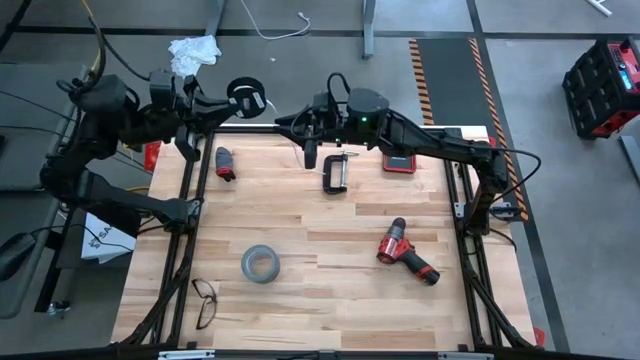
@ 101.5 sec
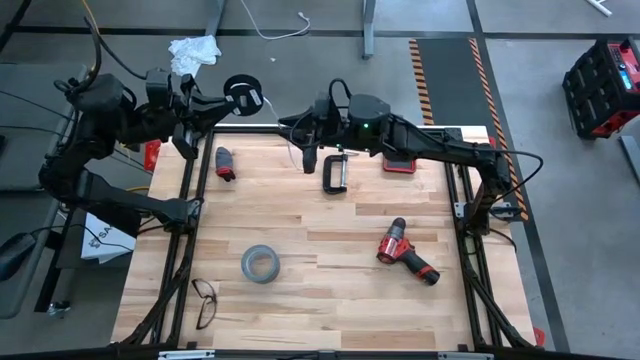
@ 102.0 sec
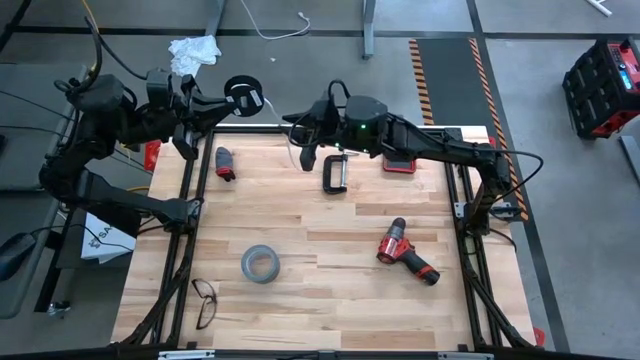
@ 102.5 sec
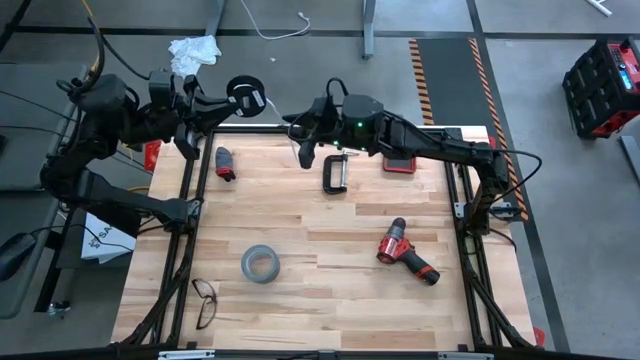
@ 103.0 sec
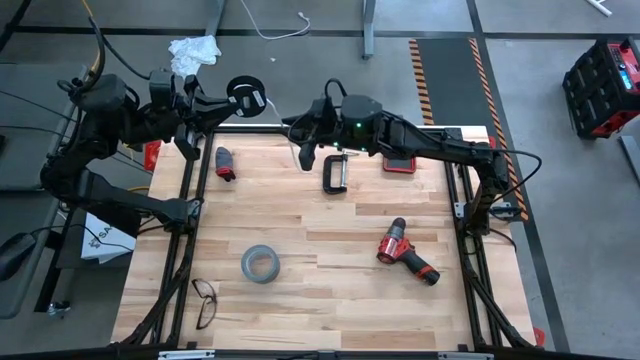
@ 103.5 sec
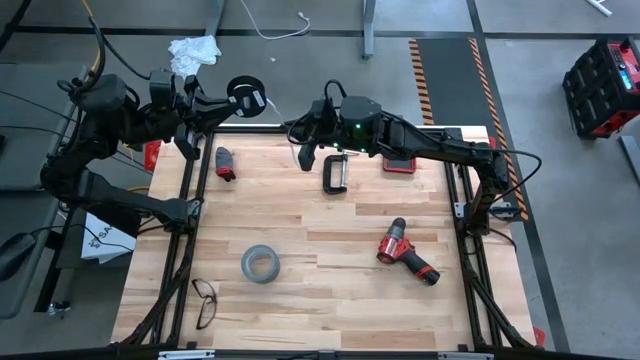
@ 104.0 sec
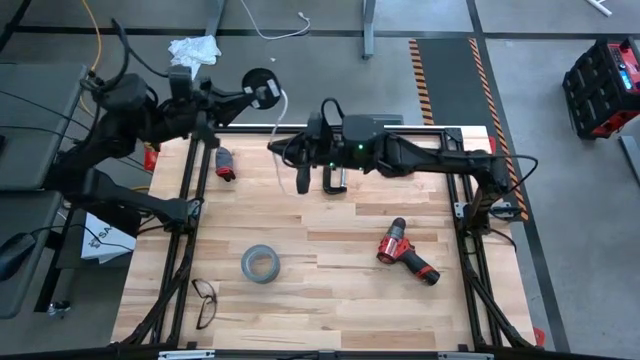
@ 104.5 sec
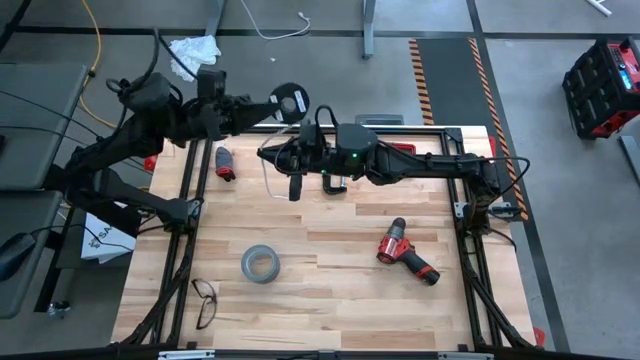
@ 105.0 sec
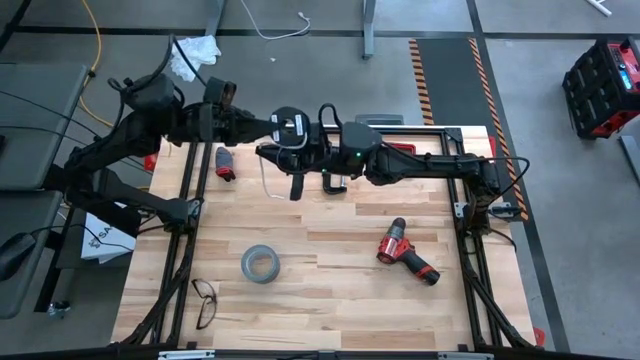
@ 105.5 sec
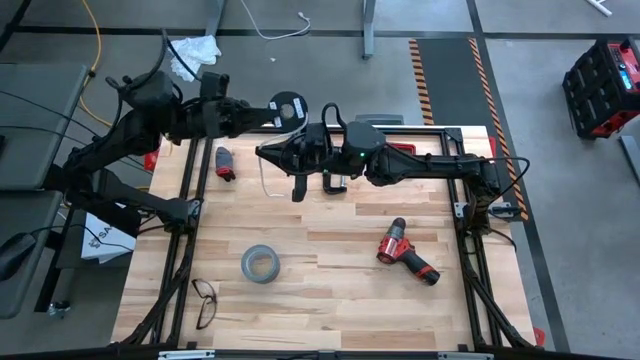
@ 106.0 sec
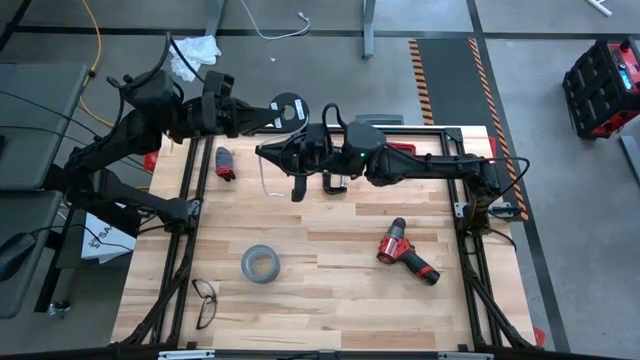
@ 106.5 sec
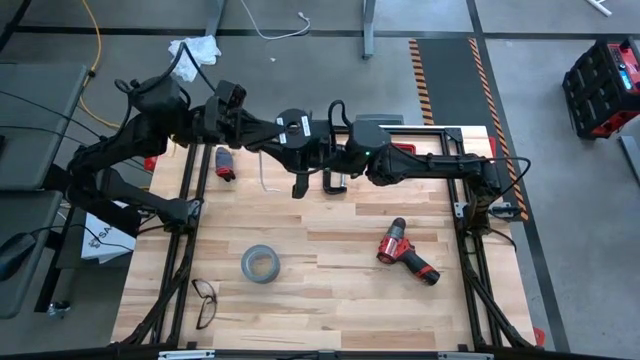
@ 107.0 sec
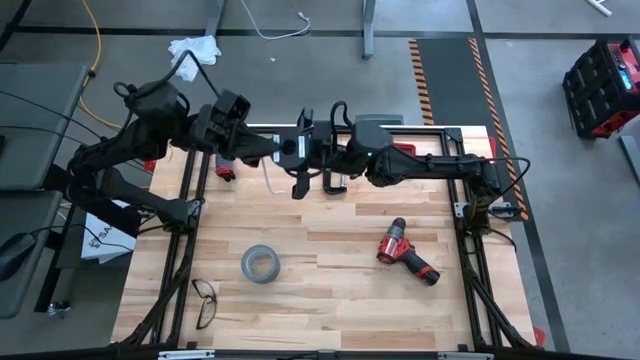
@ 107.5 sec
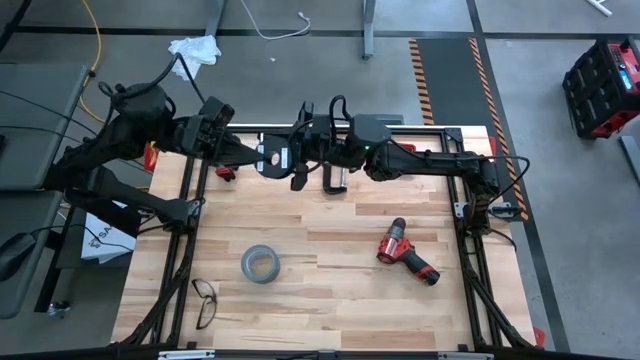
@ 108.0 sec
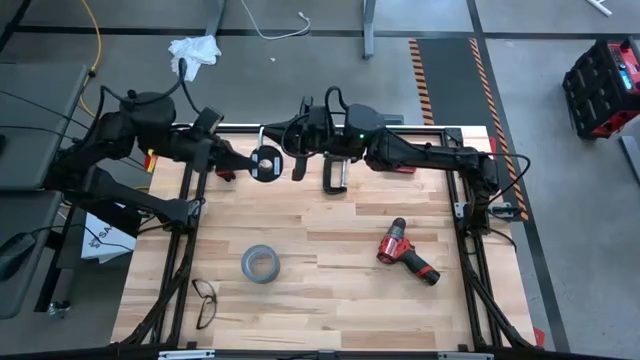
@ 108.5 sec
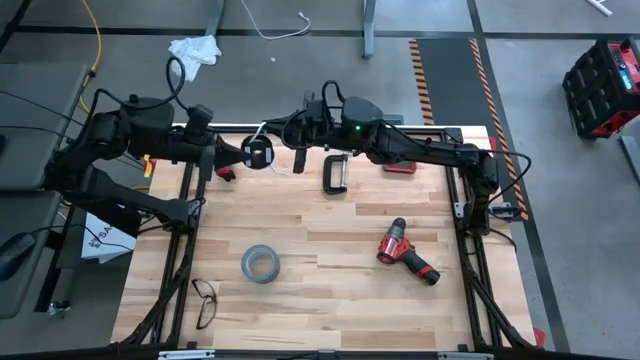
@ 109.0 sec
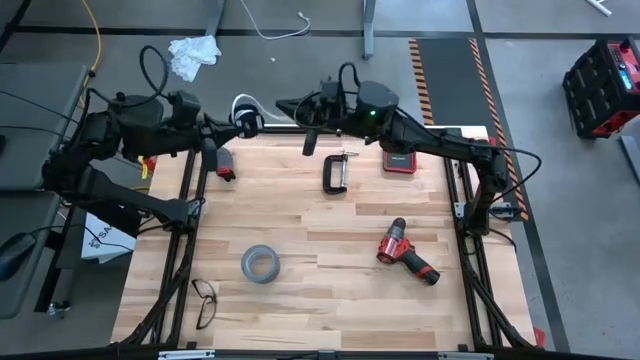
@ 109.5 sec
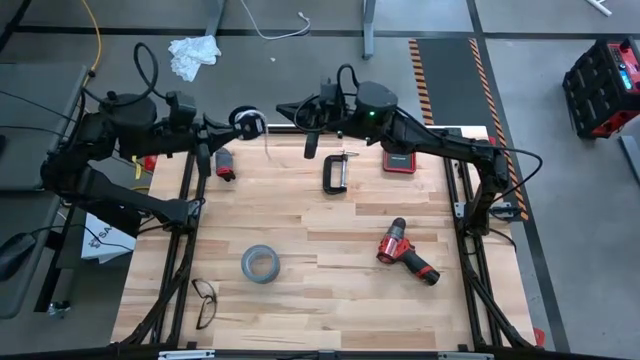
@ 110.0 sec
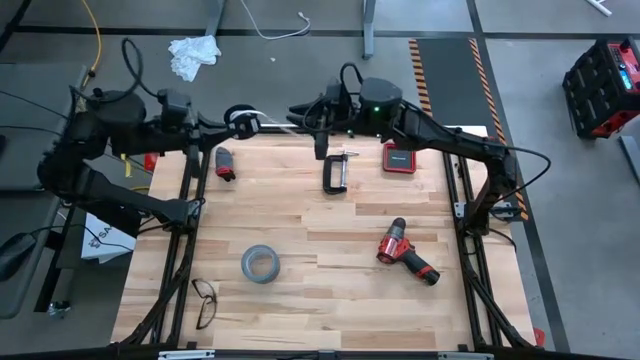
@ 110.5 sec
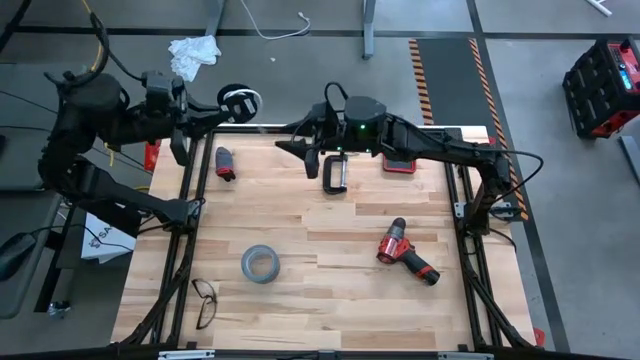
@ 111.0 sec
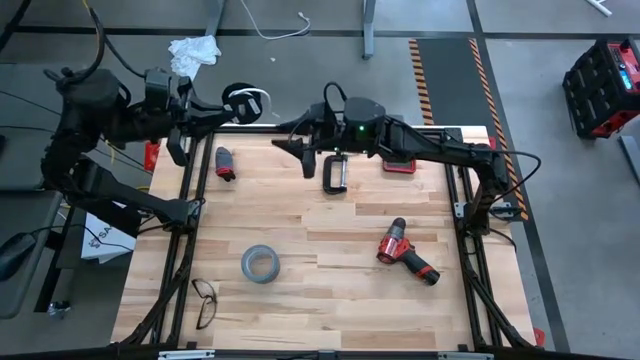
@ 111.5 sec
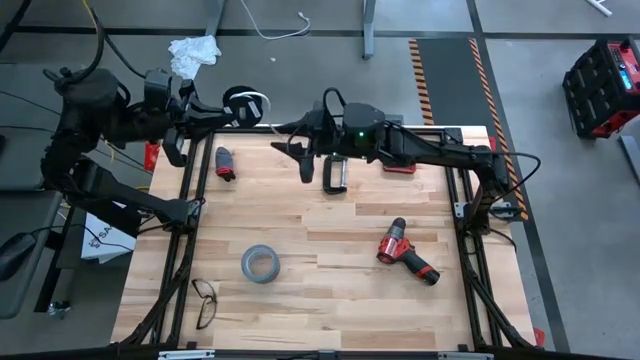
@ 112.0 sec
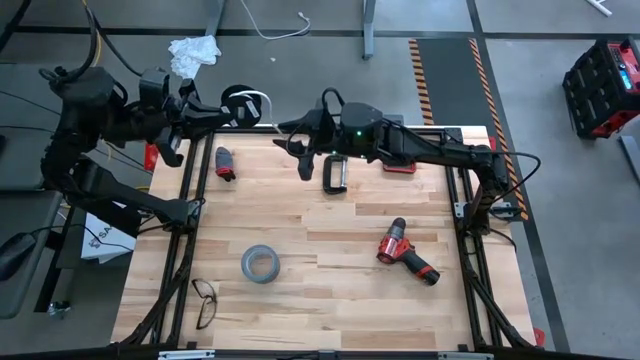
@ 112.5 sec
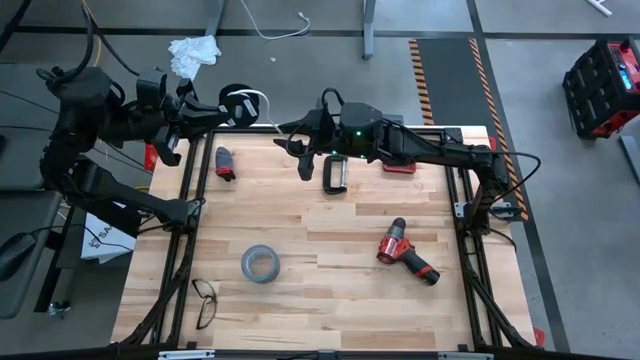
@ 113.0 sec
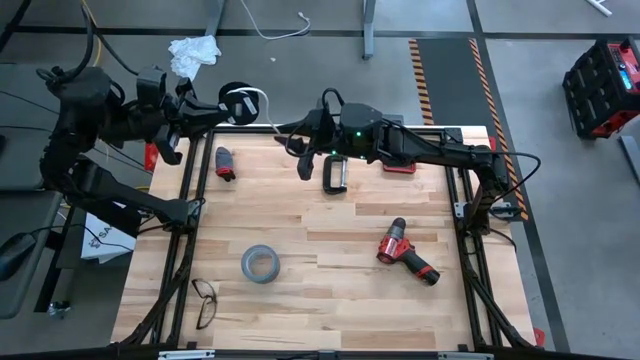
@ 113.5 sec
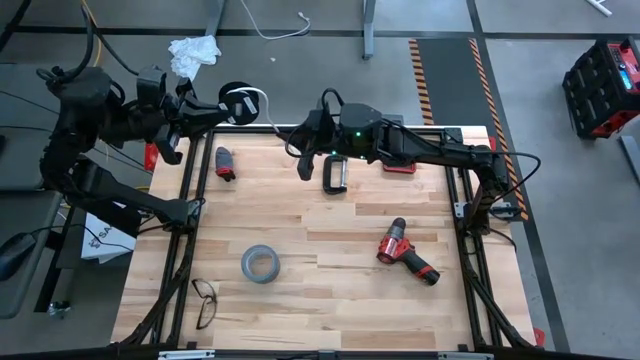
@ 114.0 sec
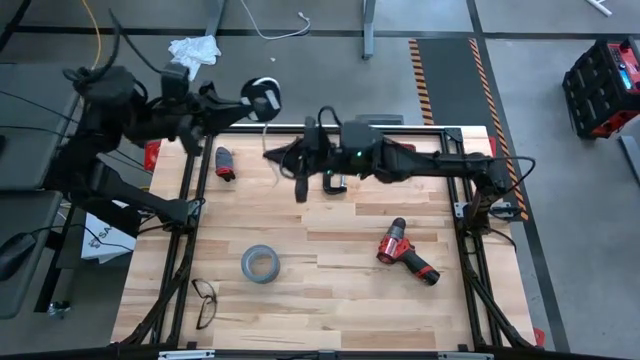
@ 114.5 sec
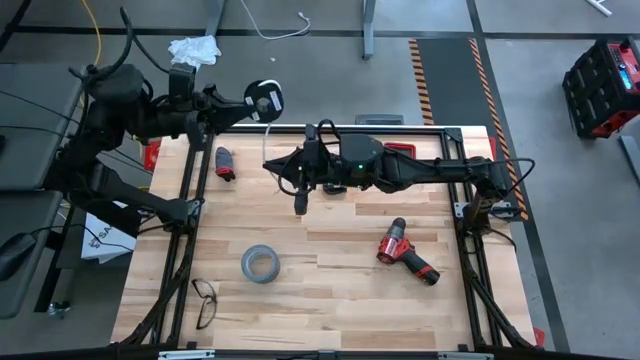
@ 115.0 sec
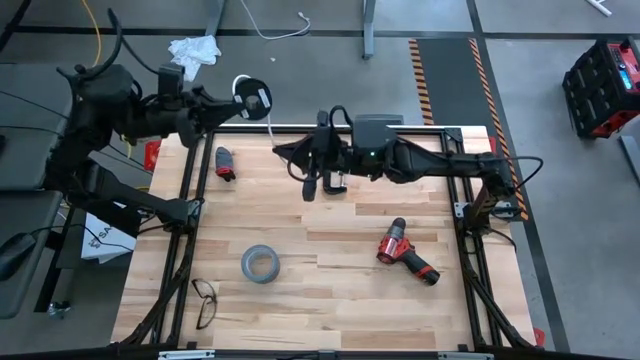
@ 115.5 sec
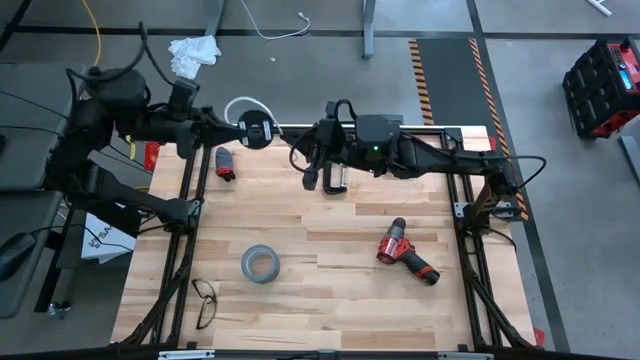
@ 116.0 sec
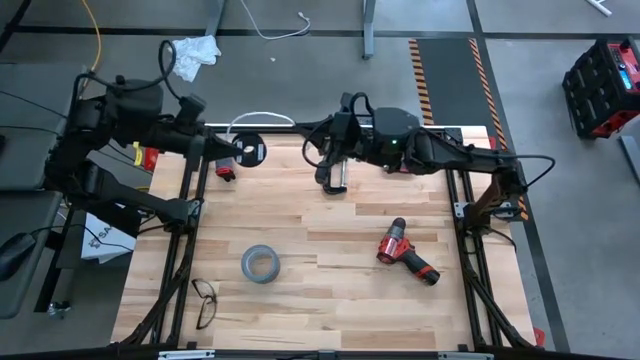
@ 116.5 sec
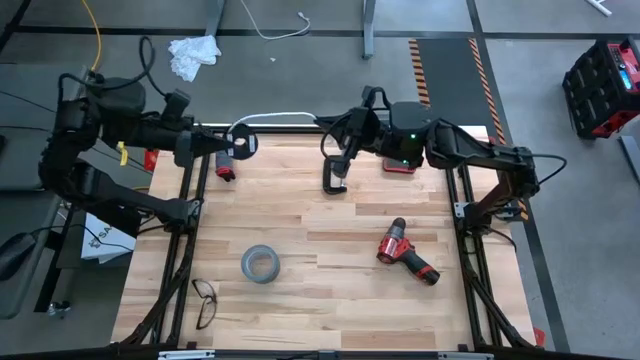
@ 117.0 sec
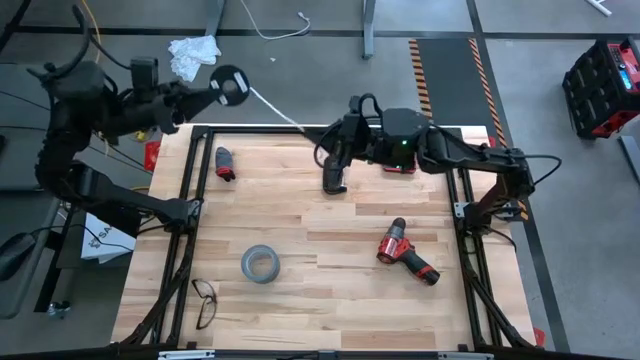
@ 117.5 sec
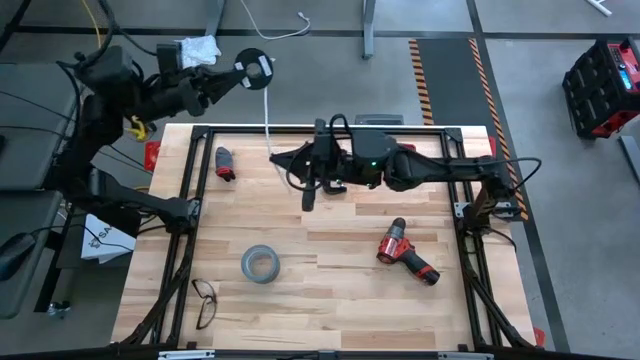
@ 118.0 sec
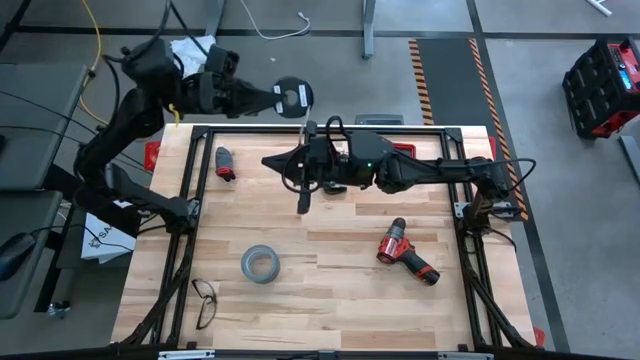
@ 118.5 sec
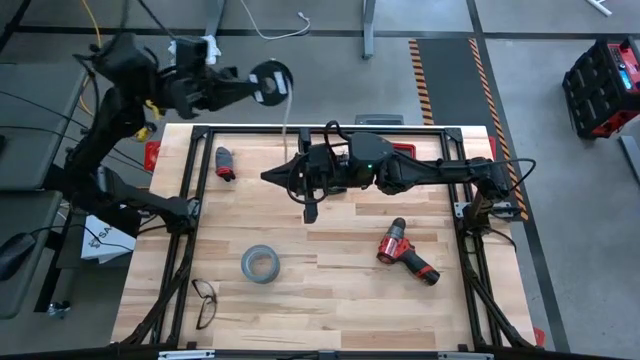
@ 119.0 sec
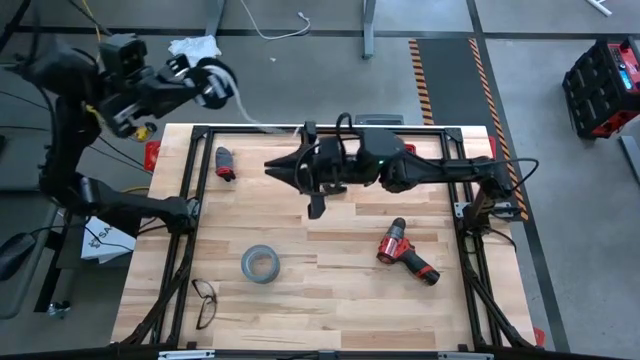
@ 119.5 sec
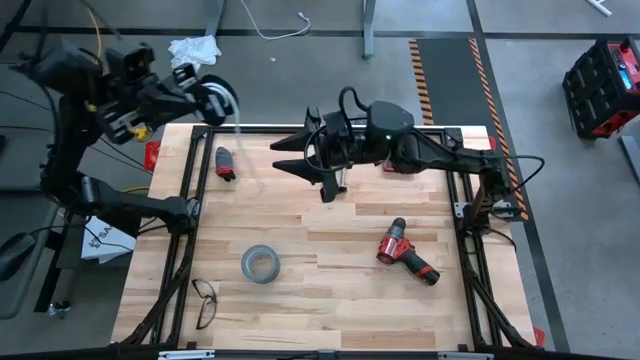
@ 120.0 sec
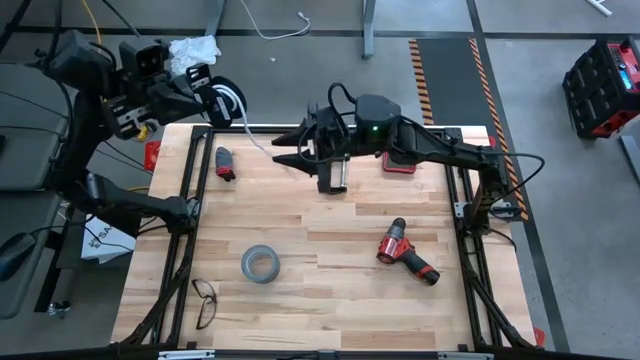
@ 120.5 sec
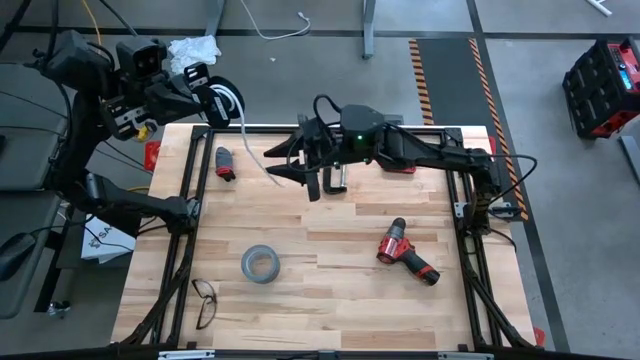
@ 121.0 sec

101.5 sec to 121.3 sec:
Task: Coil cords
Coil the white wire
